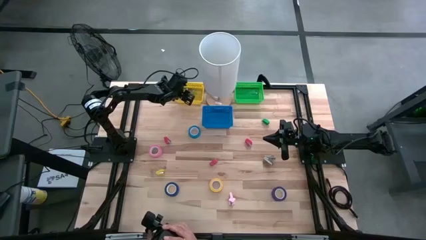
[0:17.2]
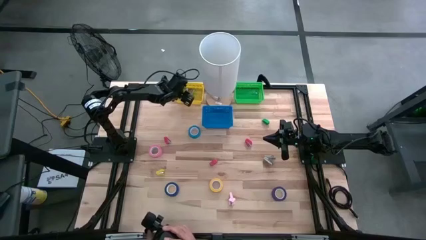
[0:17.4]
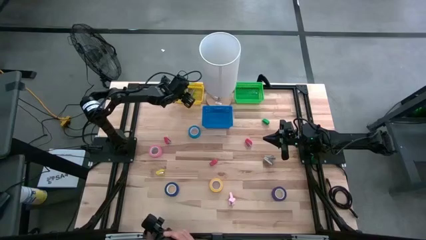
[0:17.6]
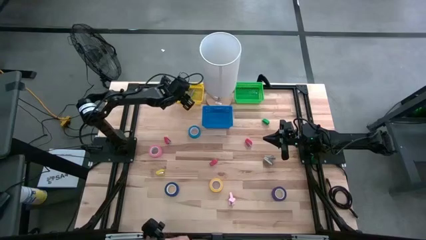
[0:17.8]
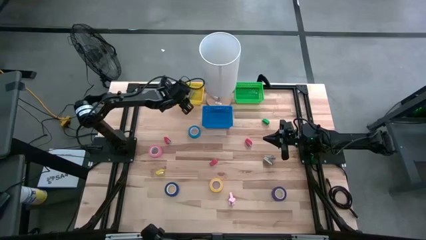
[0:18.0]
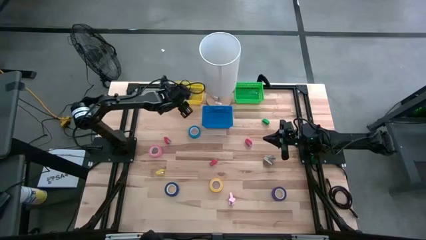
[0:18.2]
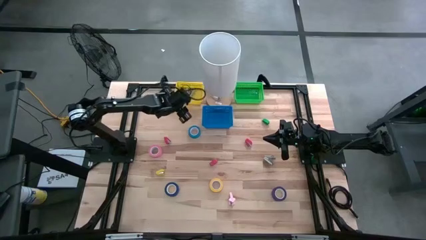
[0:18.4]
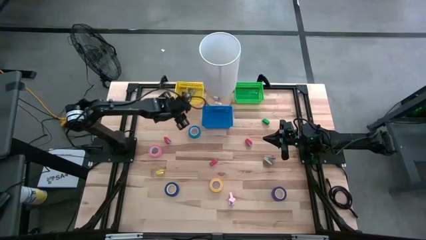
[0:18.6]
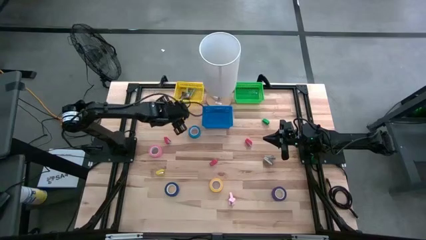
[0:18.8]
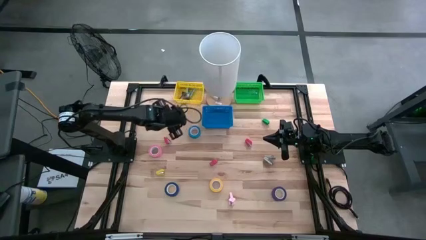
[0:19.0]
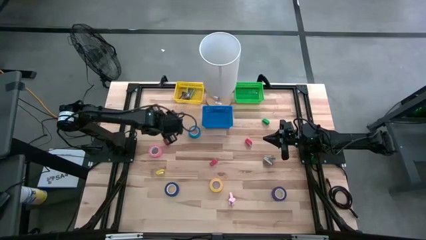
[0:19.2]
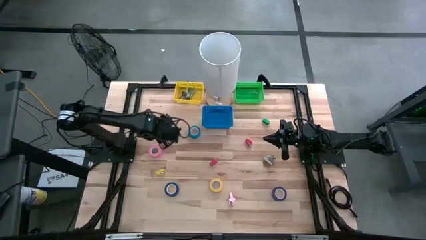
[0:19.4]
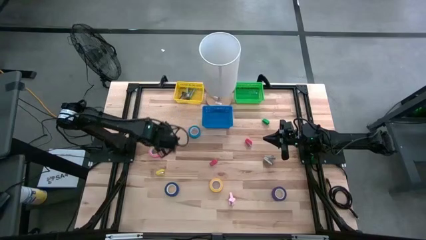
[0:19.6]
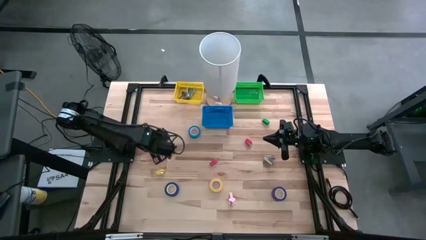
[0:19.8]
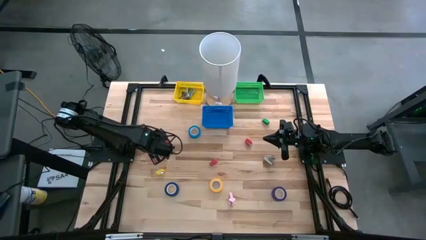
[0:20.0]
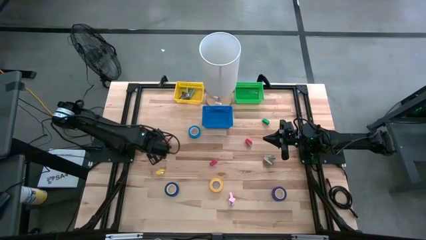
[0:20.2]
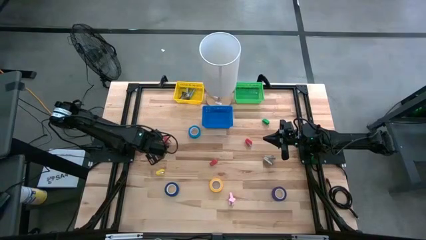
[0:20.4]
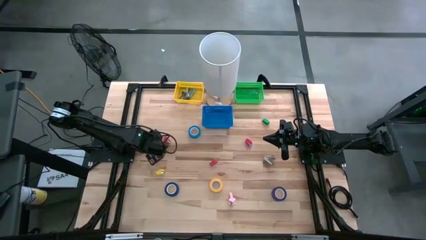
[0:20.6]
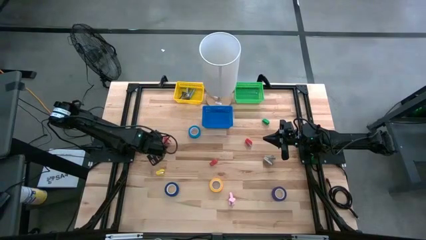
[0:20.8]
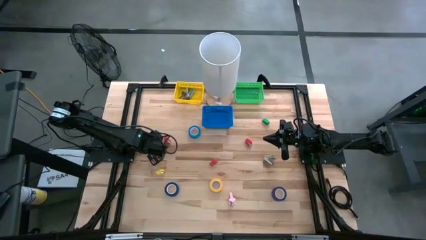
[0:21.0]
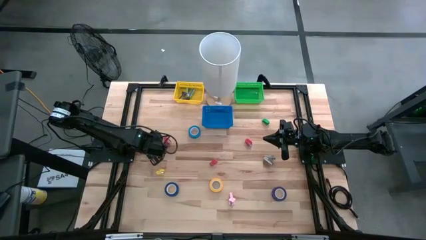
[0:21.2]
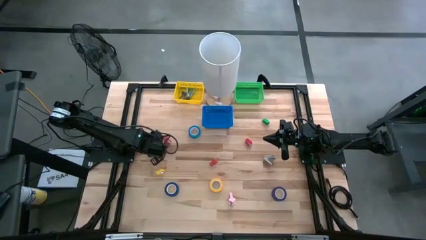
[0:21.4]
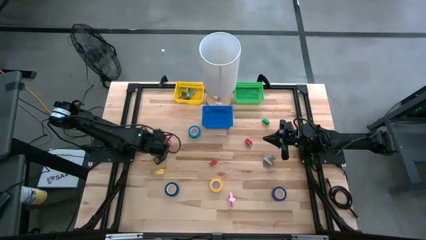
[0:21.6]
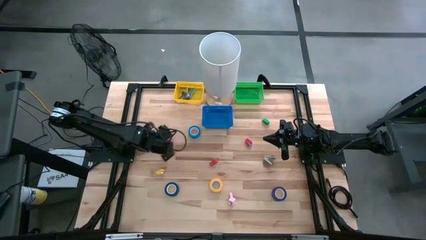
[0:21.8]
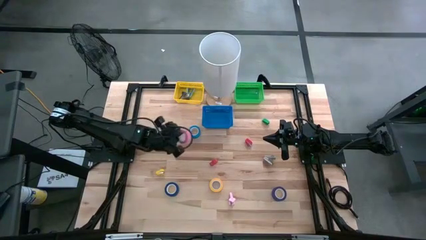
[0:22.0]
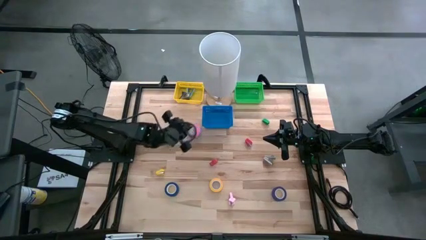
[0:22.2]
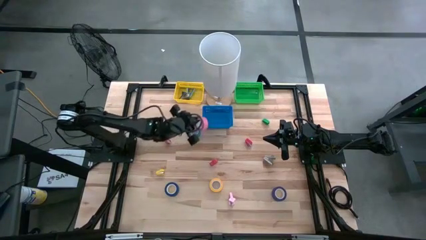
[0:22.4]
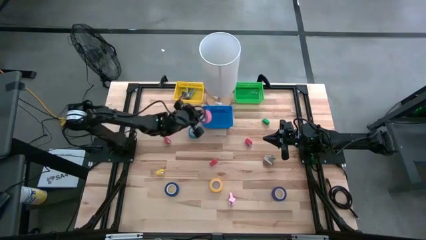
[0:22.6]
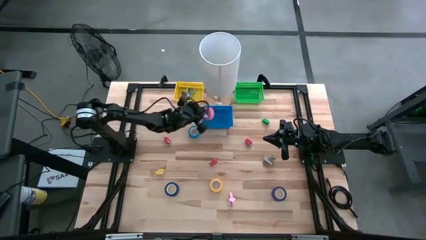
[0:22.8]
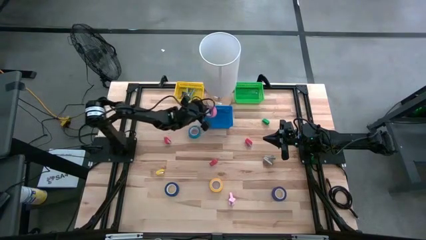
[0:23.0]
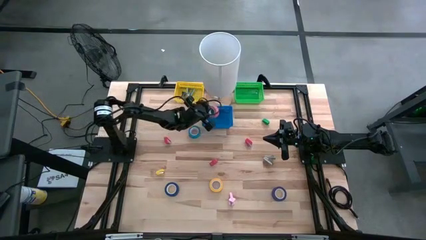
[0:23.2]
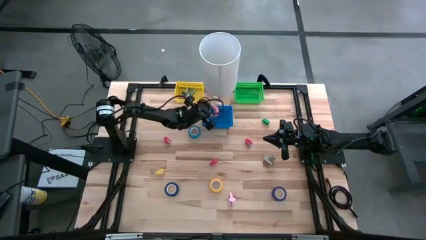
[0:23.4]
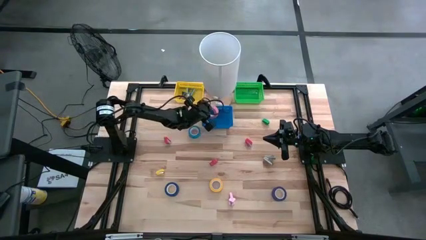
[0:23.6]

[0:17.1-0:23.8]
Task: Pick and place Stapler, Stapler remover, tape
Put the pink tape into the blue basket

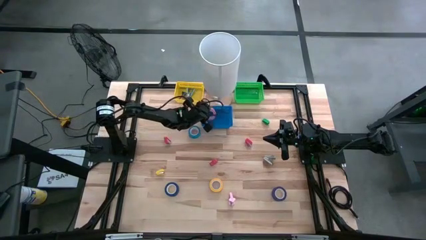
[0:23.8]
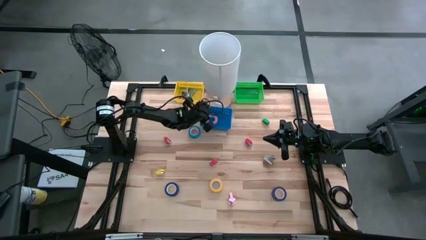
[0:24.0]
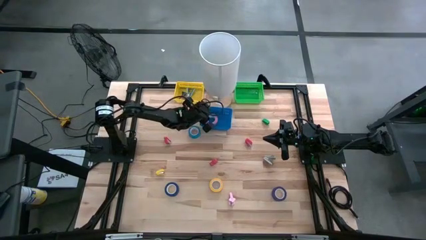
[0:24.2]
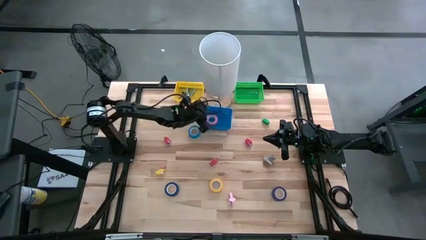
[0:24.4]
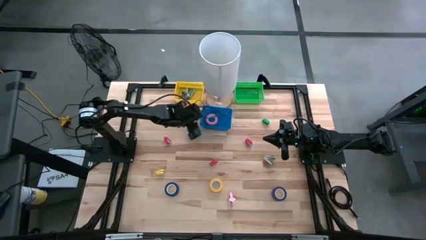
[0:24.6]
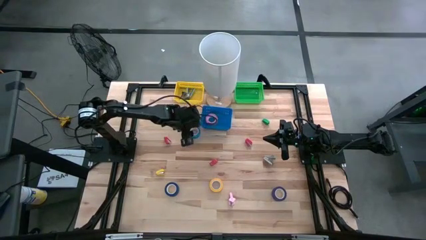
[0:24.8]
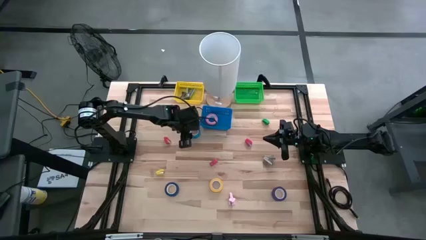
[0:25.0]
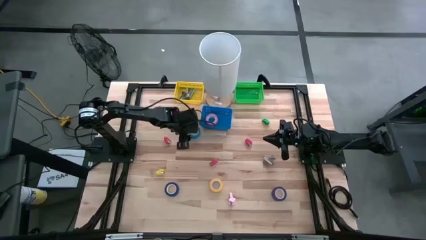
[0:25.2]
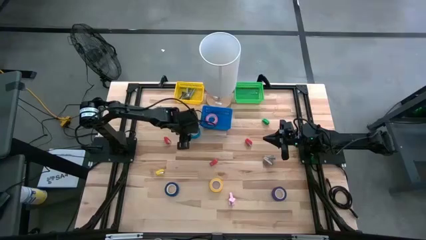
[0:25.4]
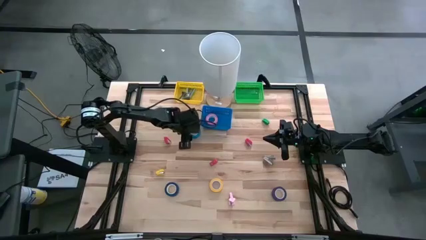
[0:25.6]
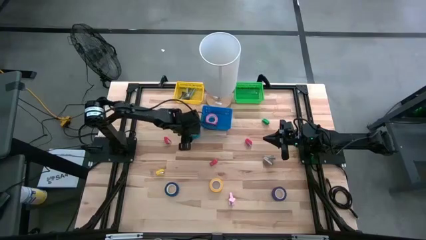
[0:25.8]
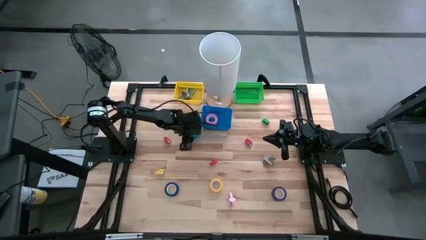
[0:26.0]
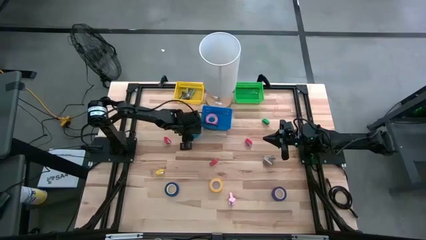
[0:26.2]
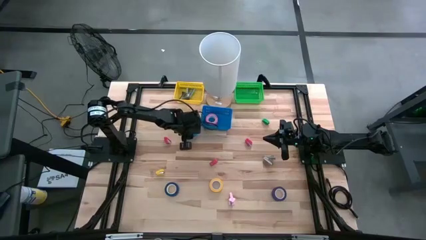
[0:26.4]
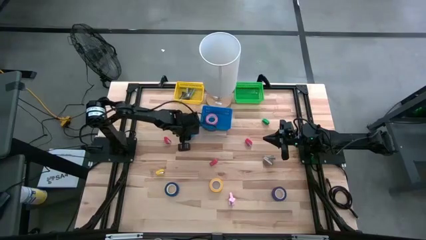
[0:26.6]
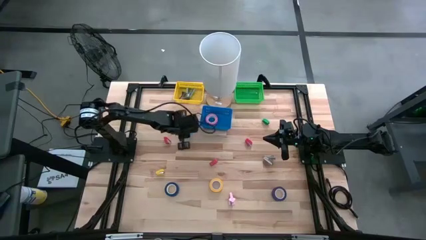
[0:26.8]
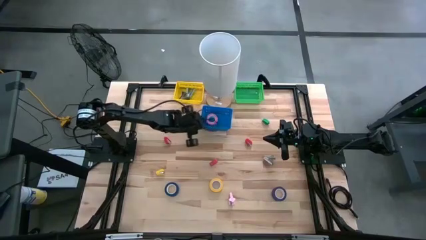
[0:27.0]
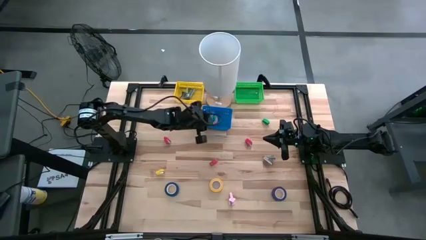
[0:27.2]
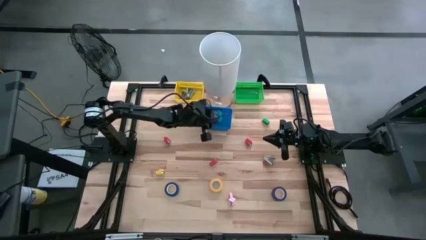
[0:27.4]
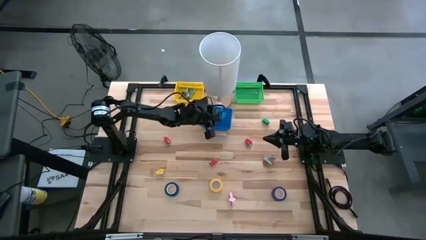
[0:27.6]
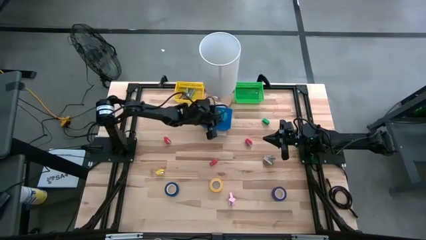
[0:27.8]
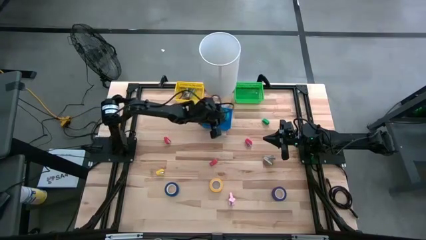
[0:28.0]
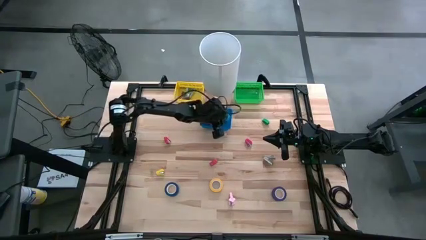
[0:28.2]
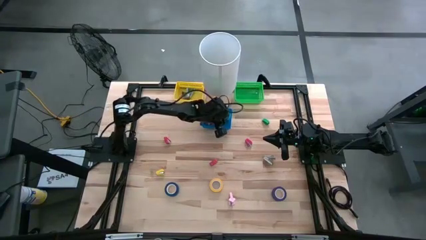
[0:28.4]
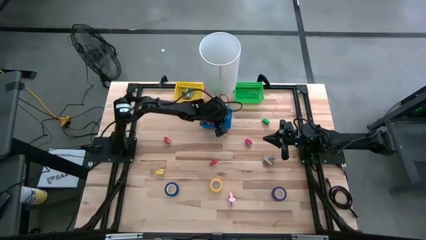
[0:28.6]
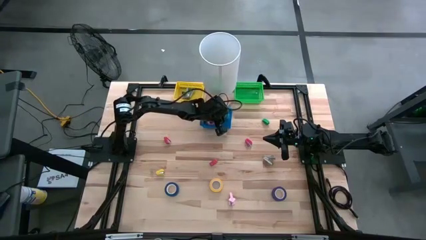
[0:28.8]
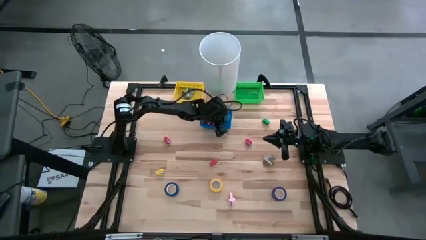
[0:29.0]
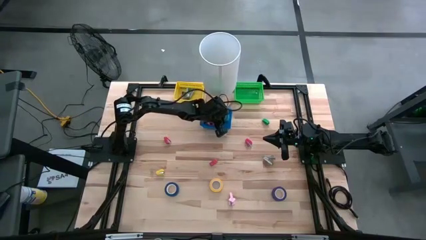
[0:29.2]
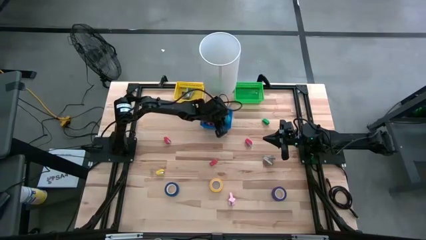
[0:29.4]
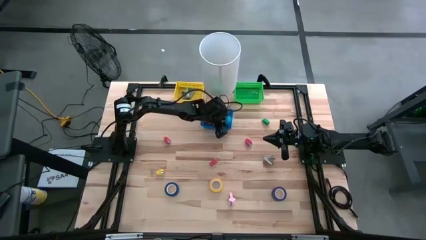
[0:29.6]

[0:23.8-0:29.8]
Put the light blue tape into the blue basket

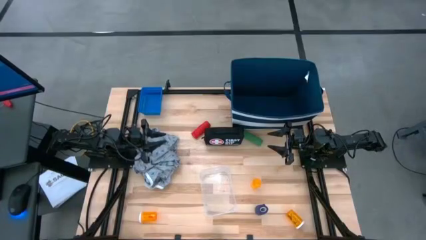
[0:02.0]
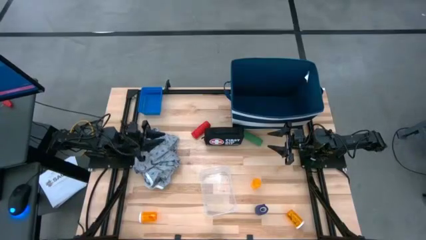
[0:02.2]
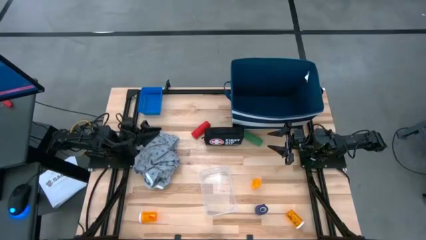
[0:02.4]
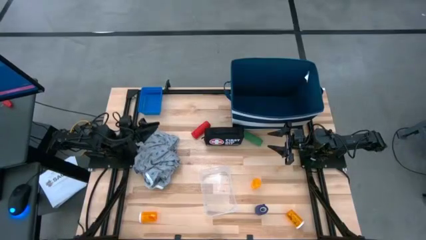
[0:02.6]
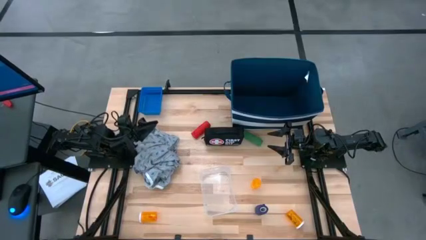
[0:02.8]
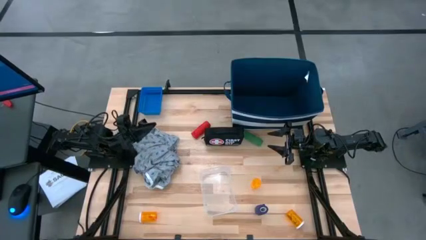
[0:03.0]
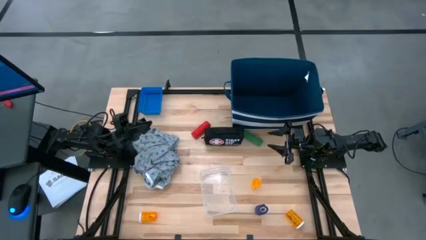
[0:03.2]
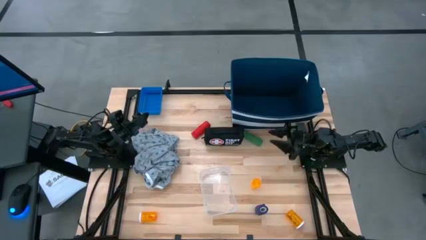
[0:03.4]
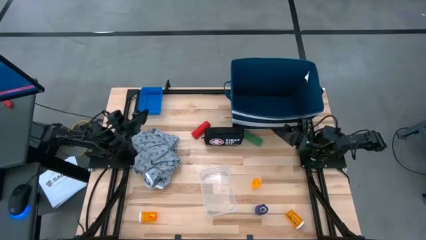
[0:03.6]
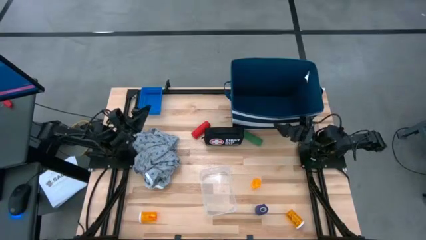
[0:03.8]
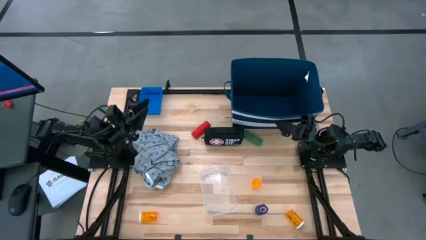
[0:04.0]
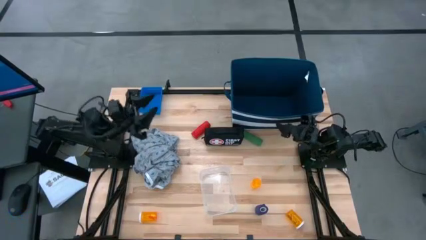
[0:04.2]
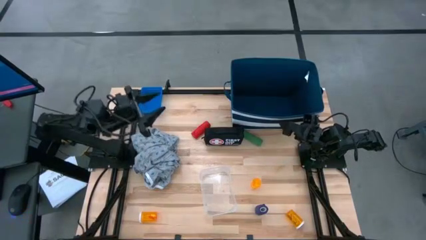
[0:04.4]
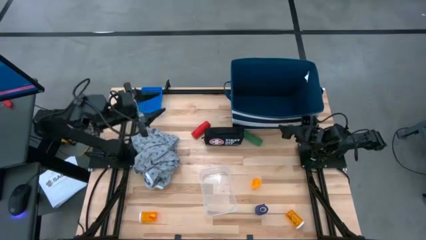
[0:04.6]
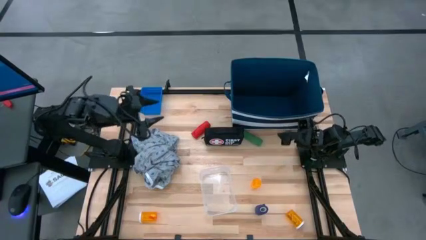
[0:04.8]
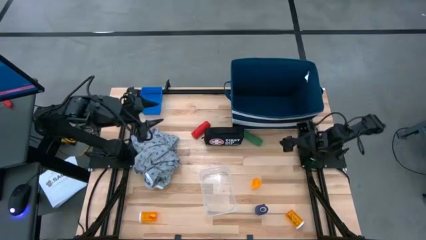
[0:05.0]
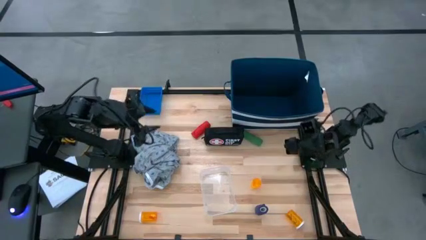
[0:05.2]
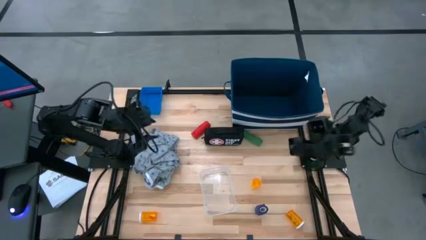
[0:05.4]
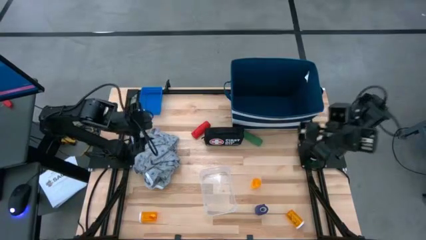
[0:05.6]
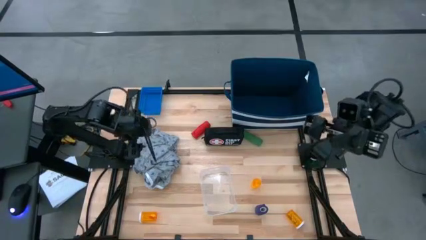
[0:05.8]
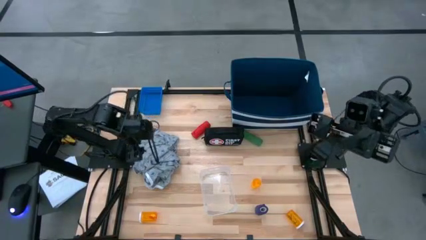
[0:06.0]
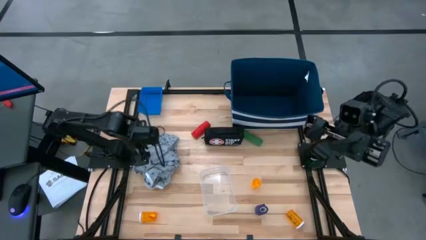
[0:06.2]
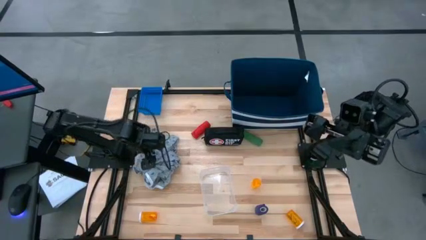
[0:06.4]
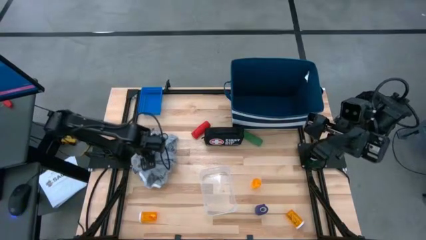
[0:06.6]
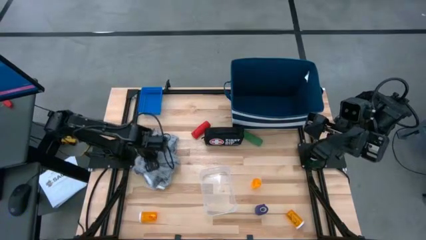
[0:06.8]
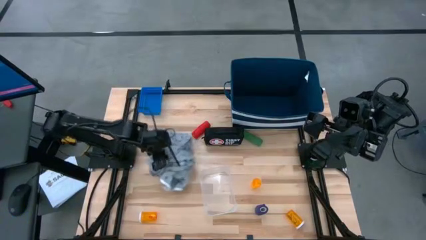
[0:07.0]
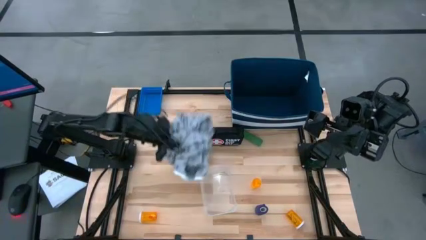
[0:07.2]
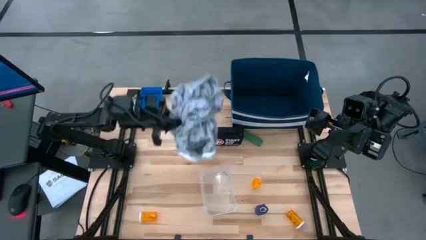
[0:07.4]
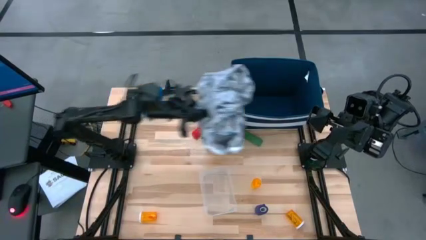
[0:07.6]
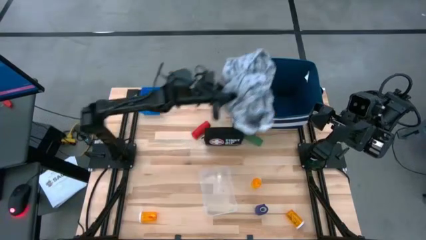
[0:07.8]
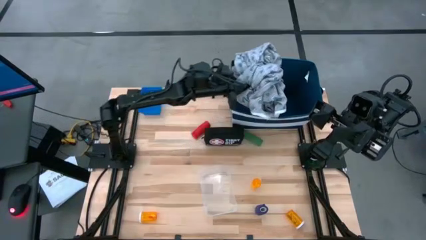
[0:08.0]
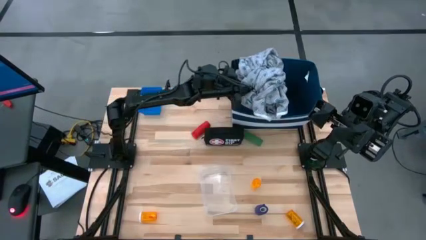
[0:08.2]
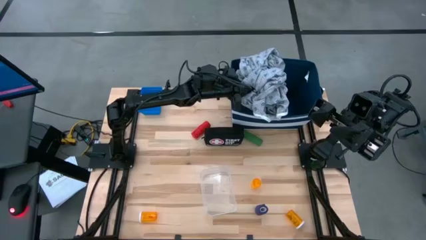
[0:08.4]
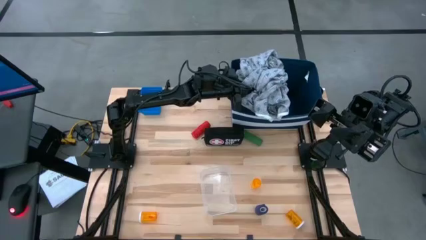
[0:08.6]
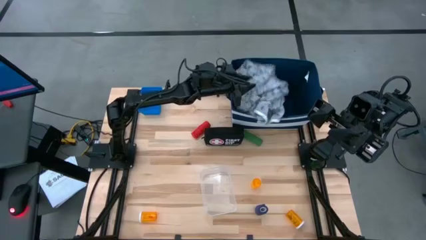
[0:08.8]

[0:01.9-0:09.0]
Task: Pick & place medical supplies in basket/bin
Put the gray patient gown into the blue laundry bin
